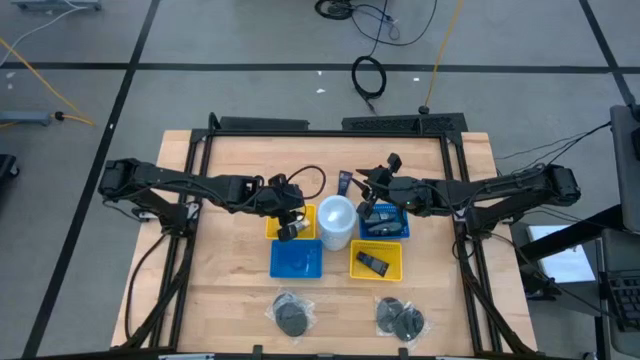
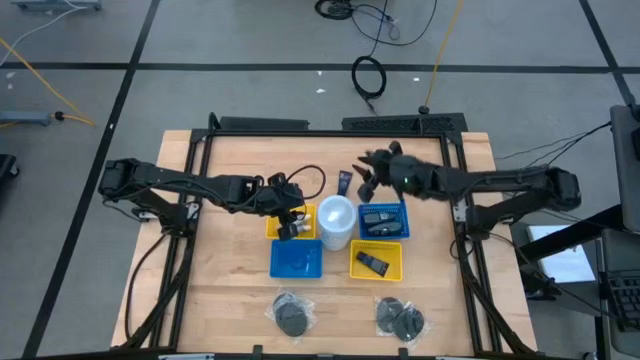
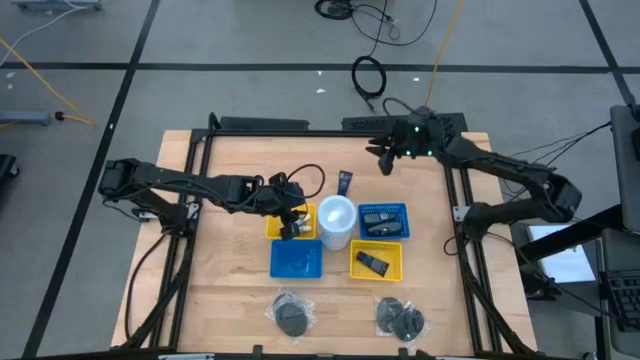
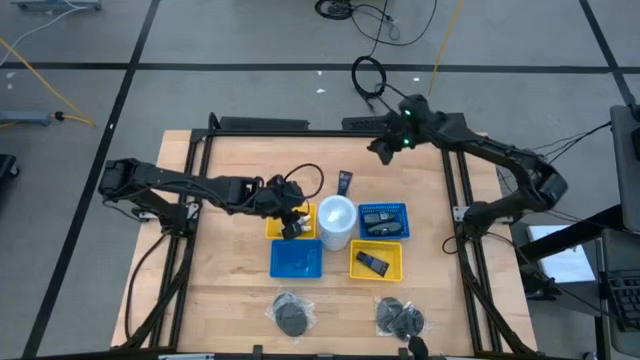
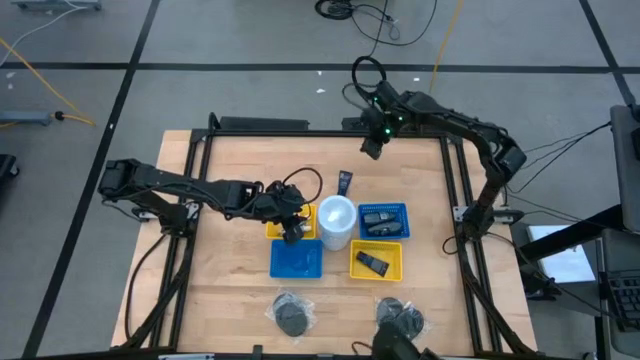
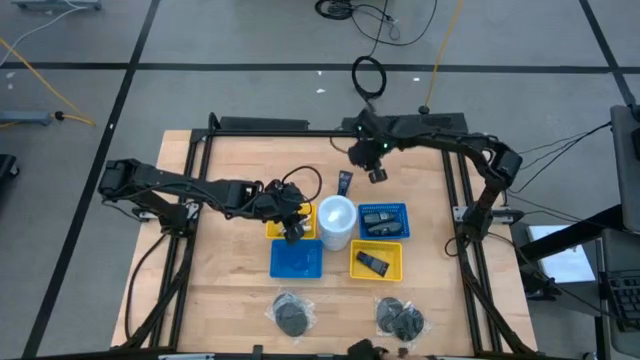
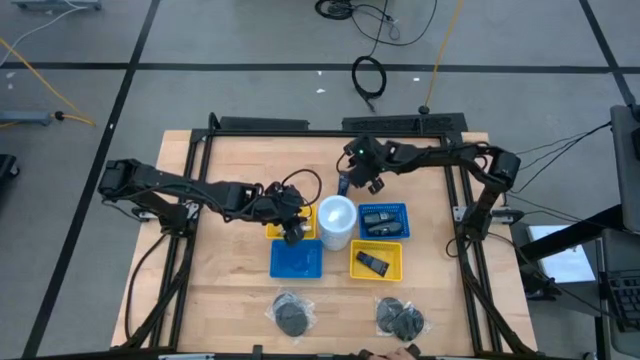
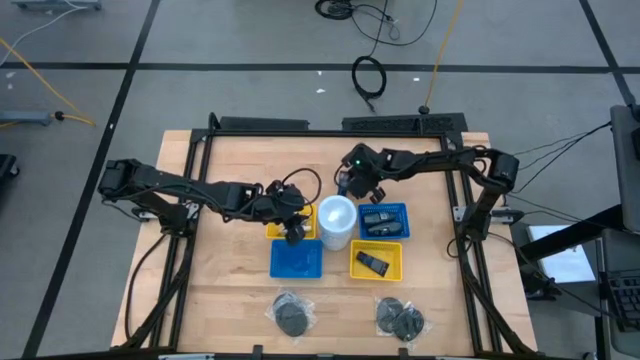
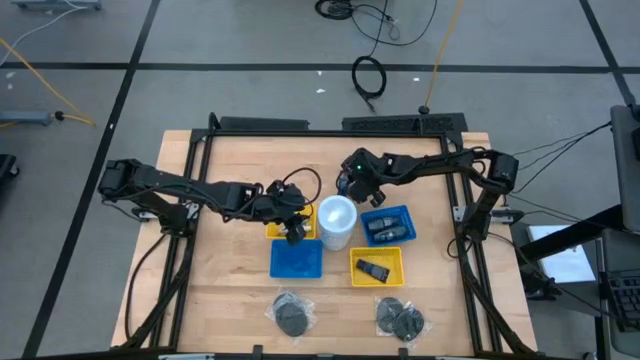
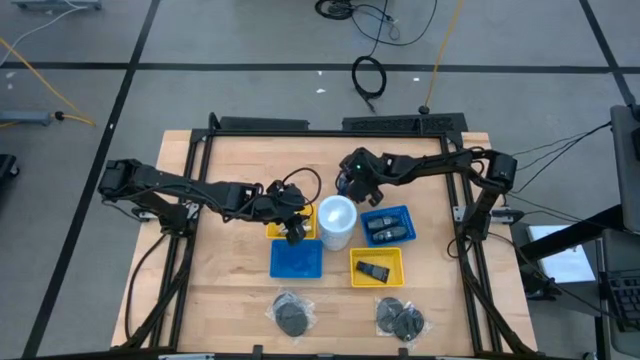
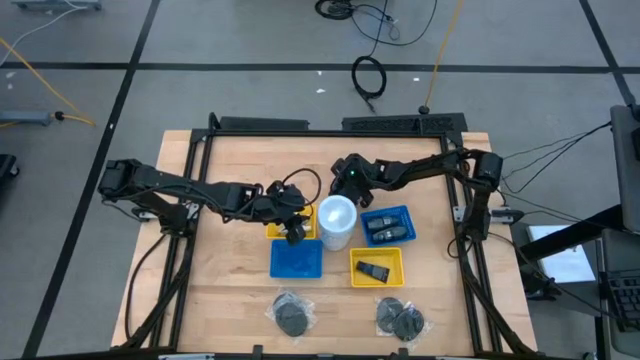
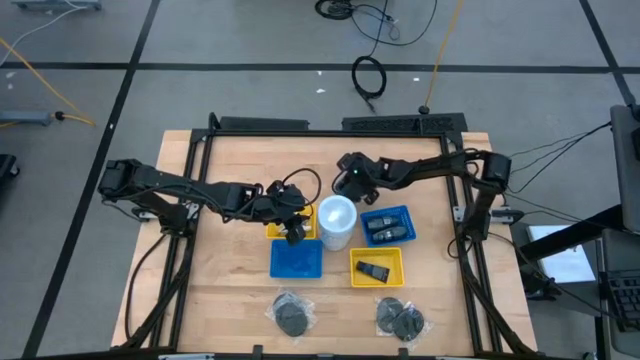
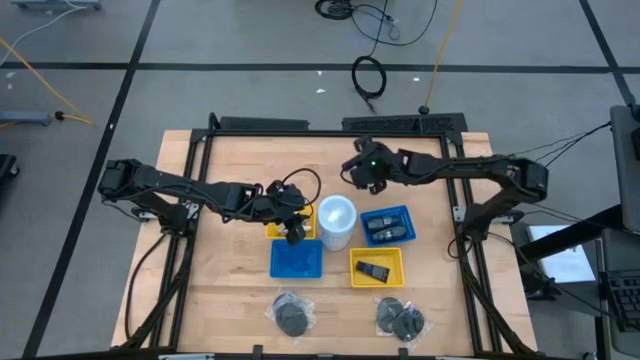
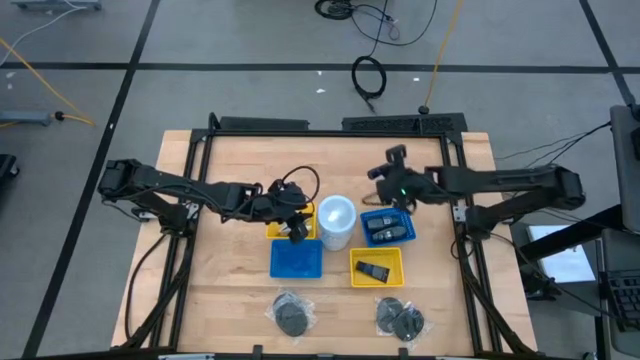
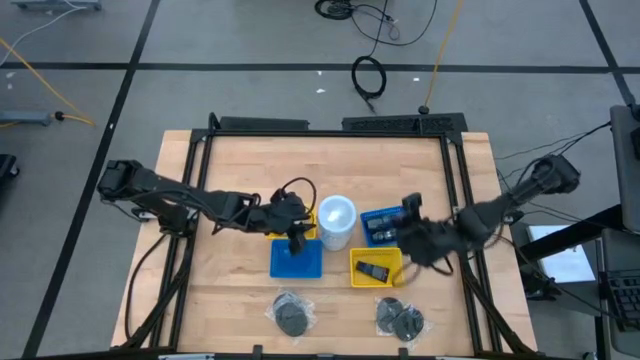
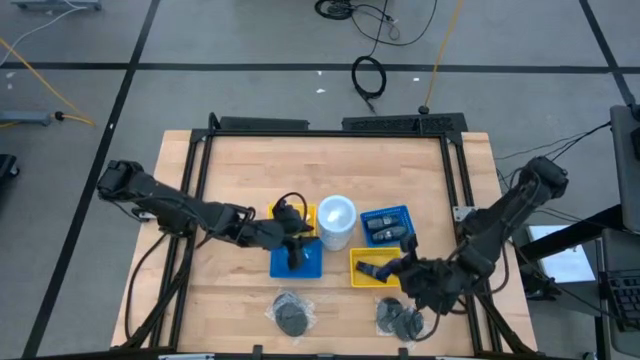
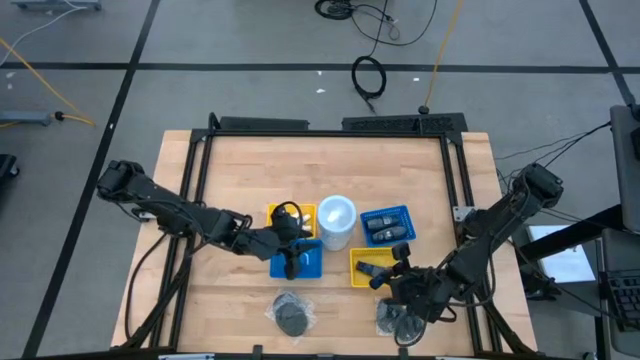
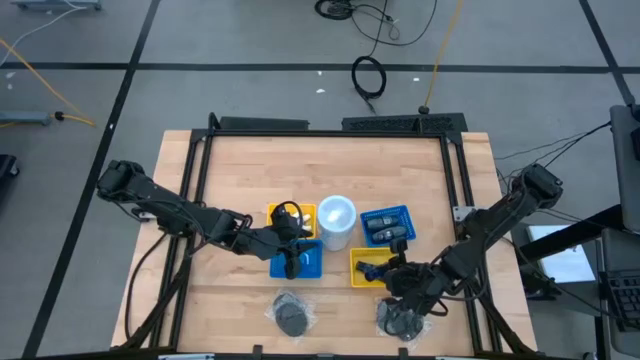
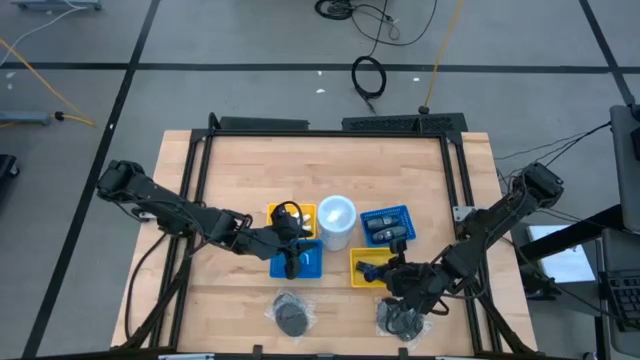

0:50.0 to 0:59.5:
Task: Pick & Place Travel size toiletries
Put the blue shave cream into the bottom yellow bin

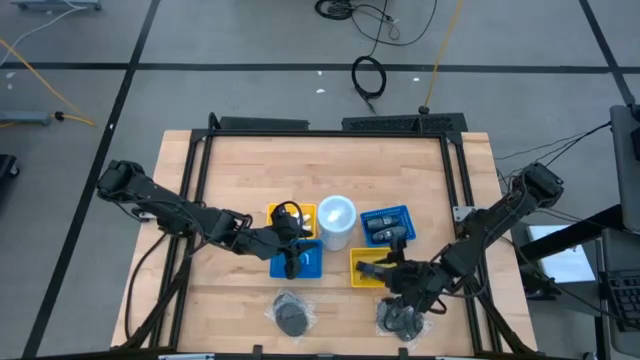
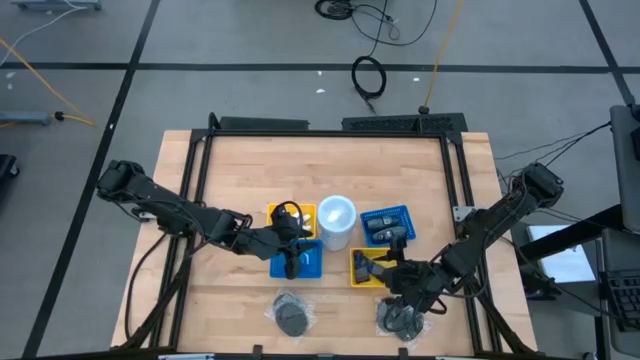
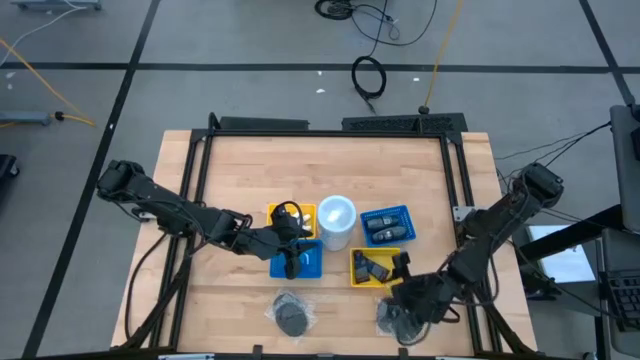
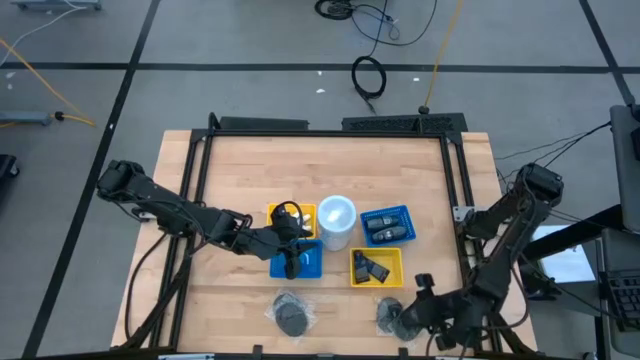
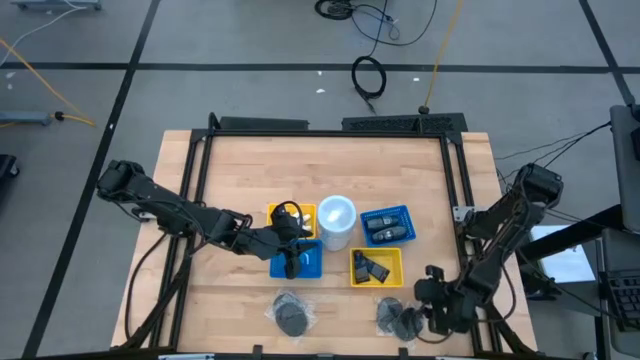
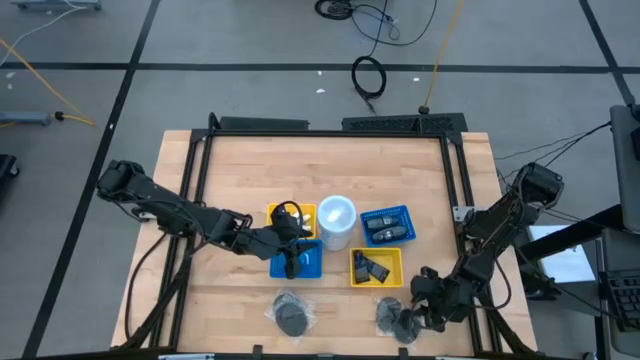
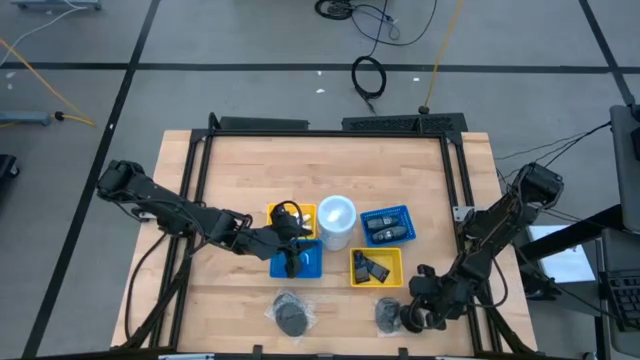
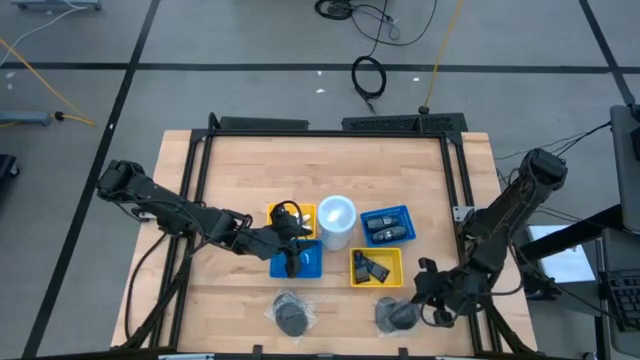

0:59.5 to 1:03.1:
Put the black hairbrush into the bottom blue bin

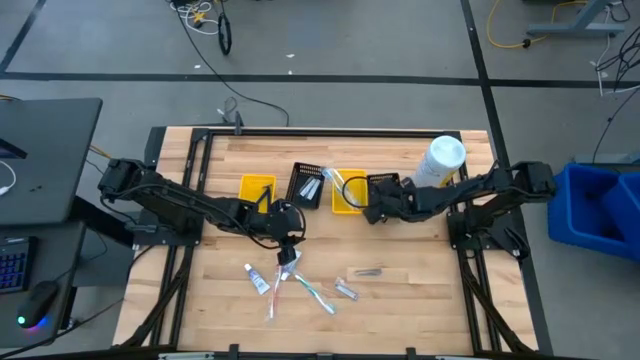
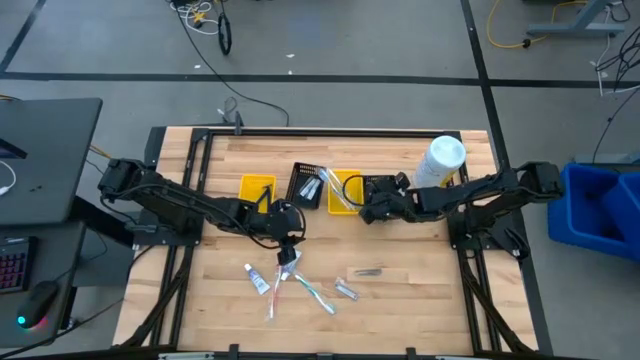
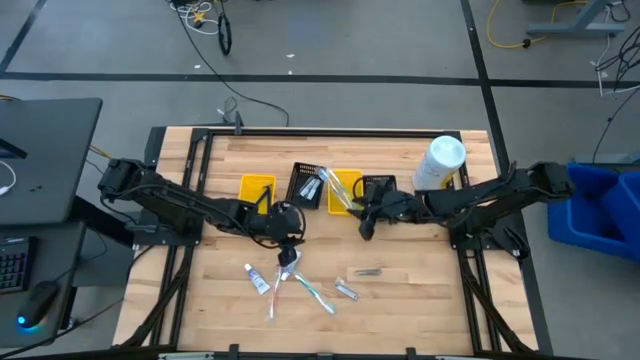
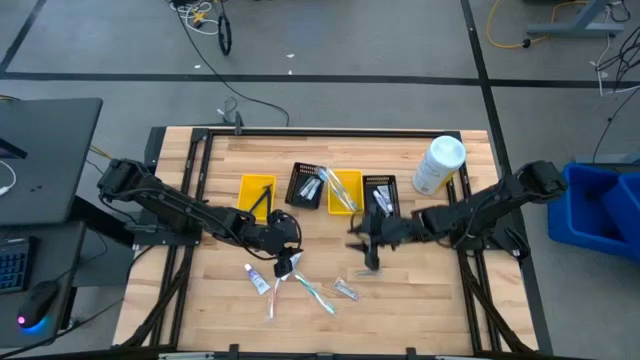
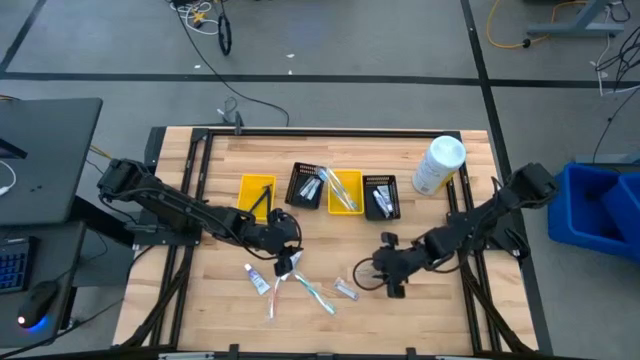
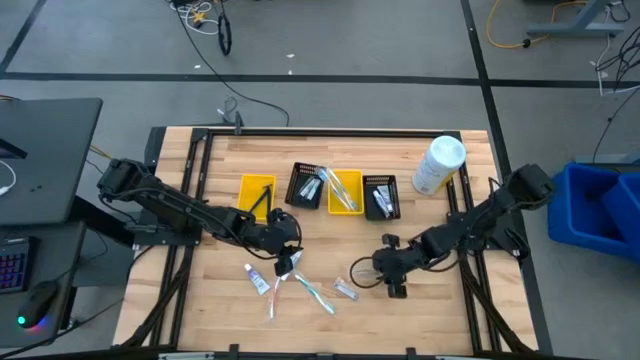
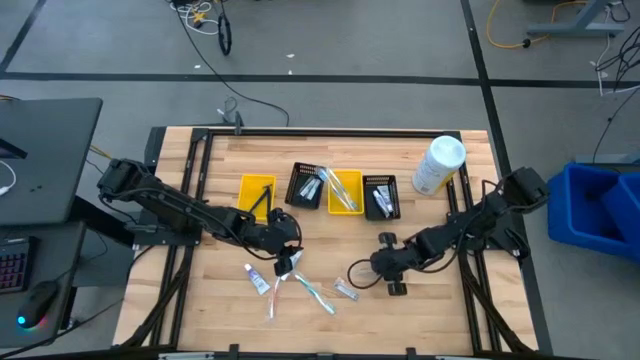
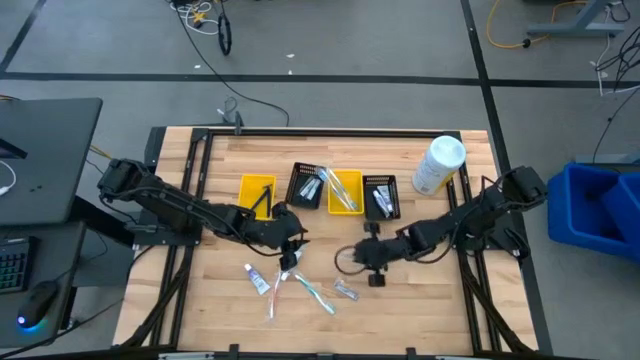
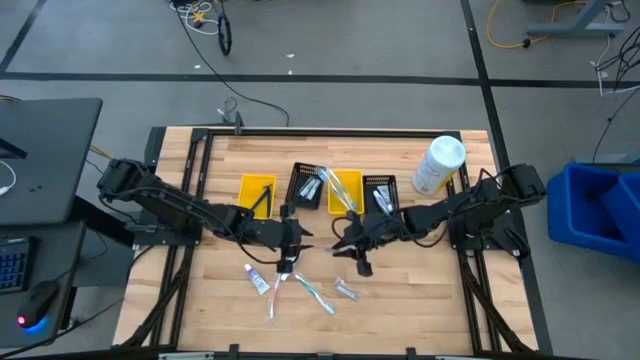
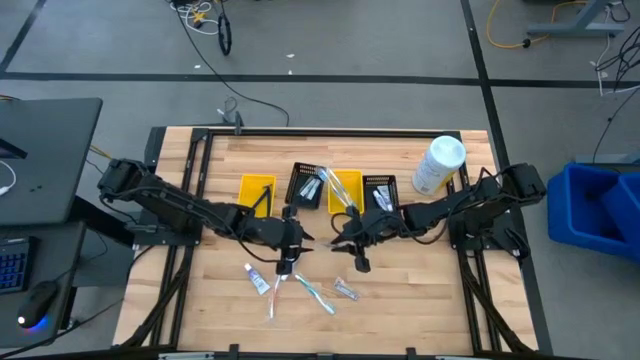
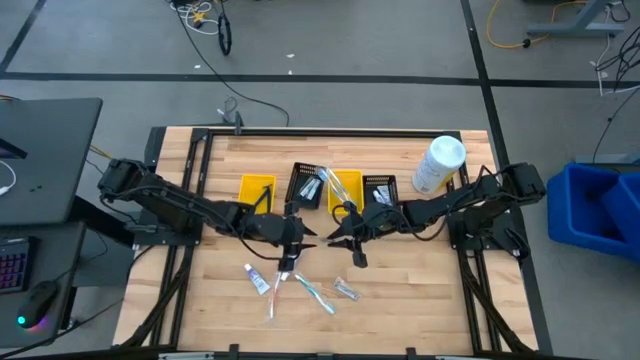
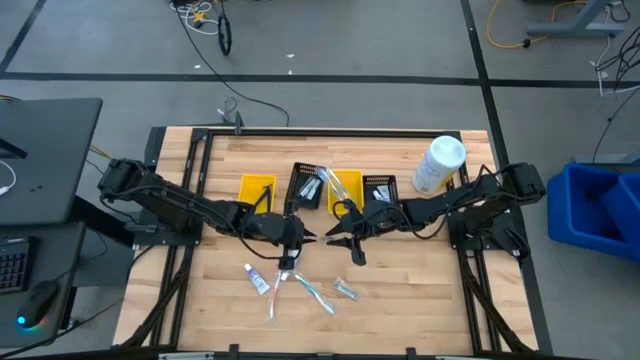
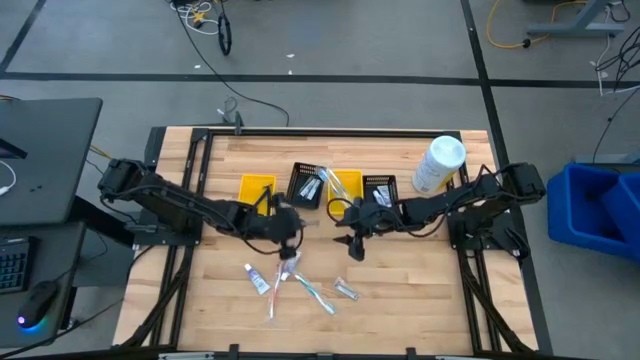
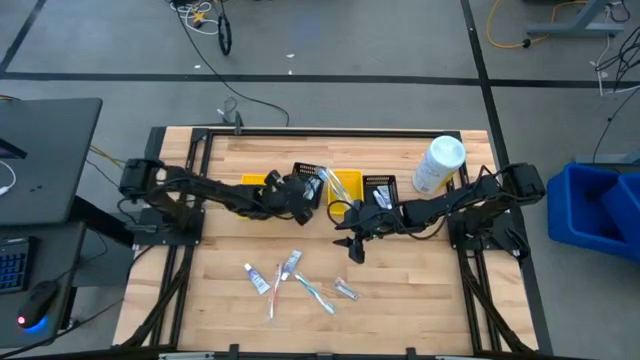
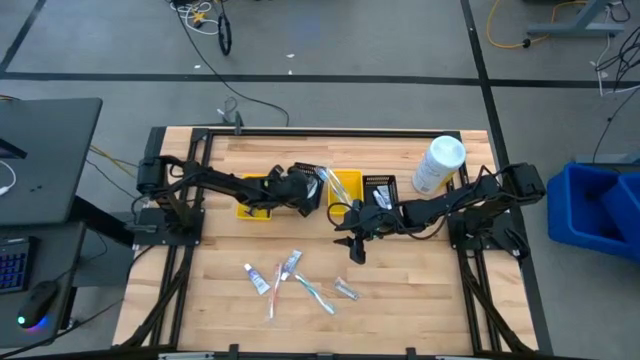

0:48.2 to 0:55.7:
Task: Pick & Place Travel size toiletries
Put the silver nail cutter into the left black bin
